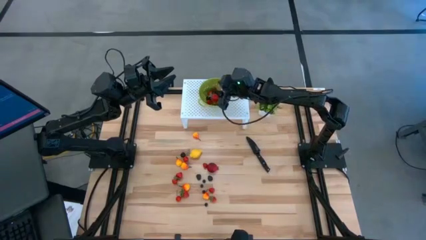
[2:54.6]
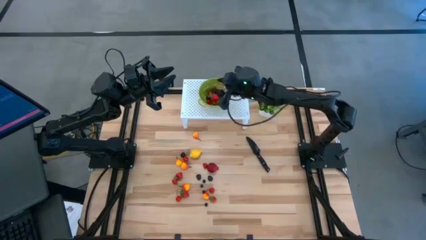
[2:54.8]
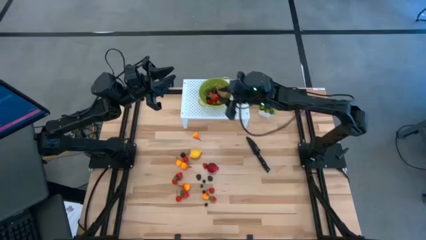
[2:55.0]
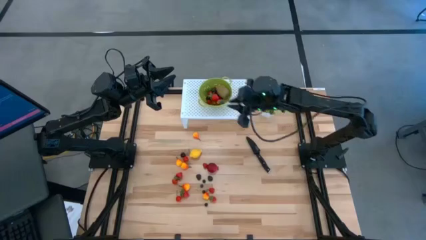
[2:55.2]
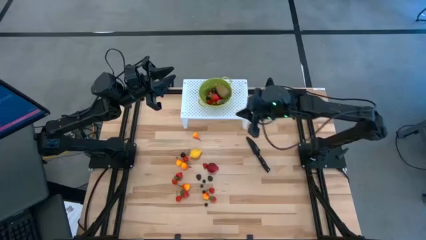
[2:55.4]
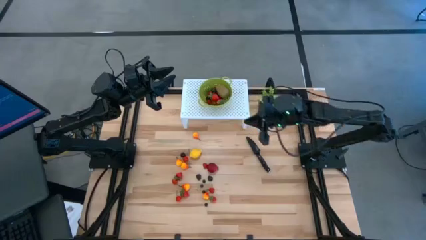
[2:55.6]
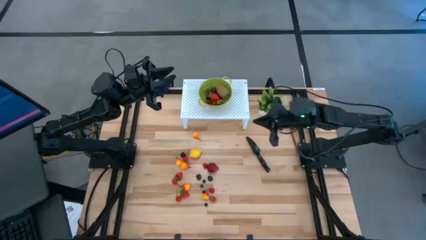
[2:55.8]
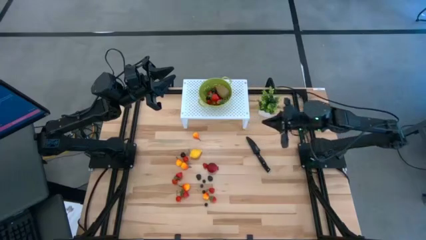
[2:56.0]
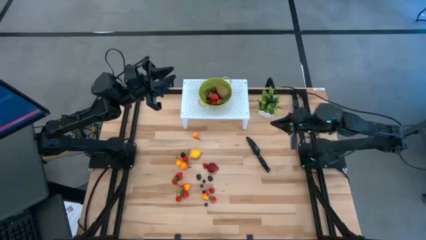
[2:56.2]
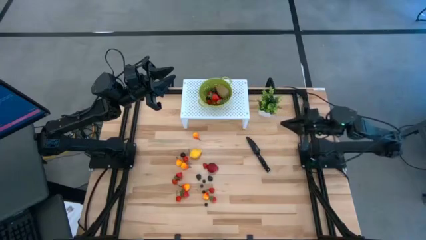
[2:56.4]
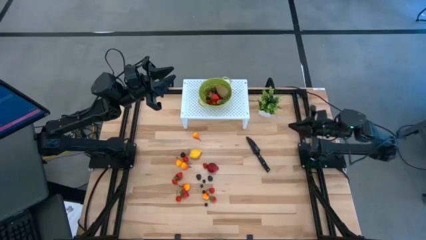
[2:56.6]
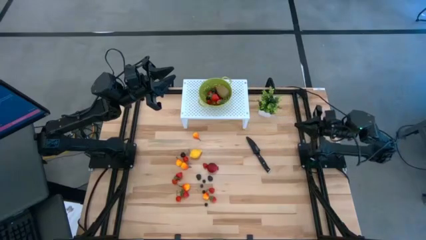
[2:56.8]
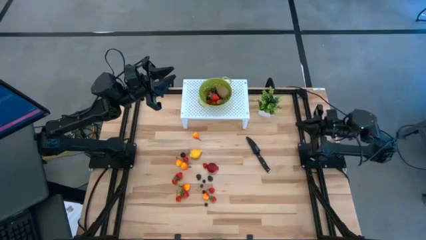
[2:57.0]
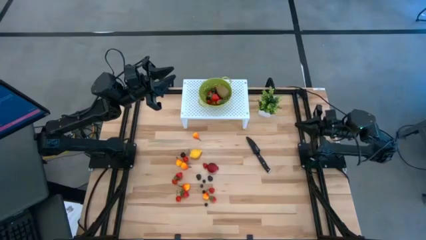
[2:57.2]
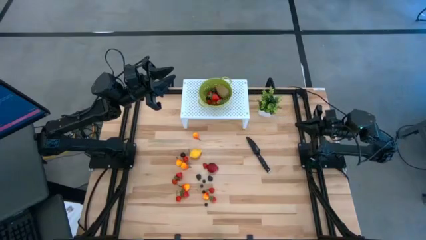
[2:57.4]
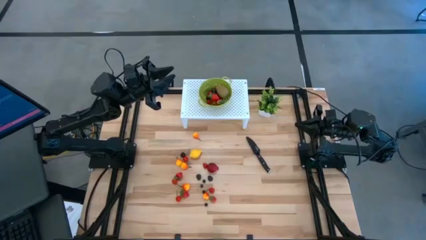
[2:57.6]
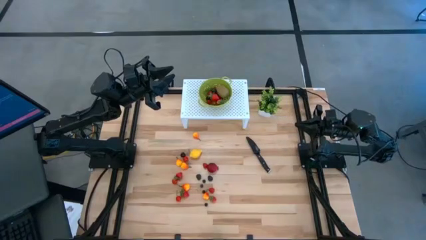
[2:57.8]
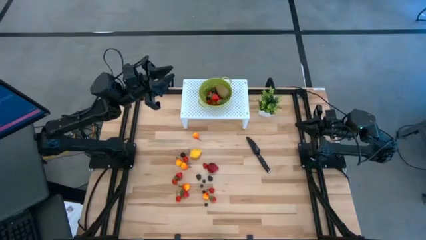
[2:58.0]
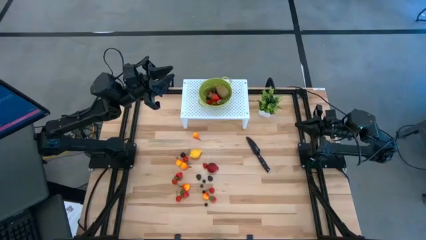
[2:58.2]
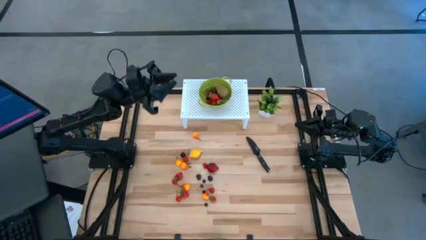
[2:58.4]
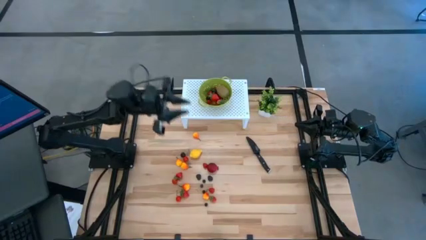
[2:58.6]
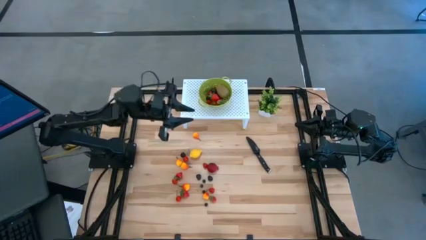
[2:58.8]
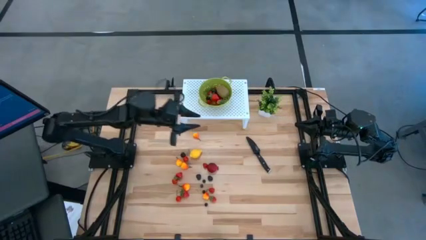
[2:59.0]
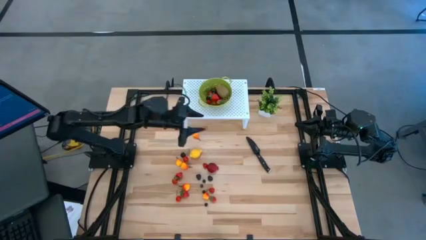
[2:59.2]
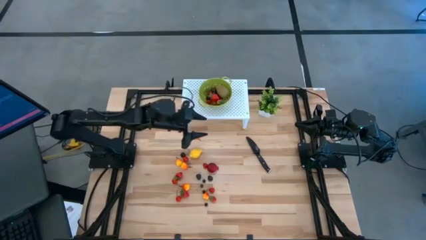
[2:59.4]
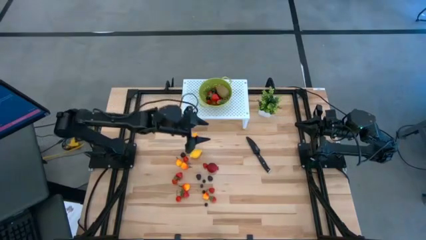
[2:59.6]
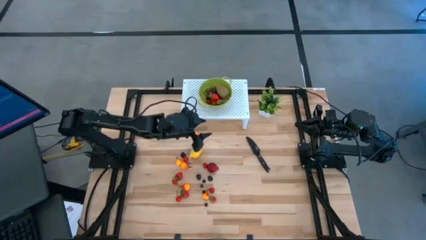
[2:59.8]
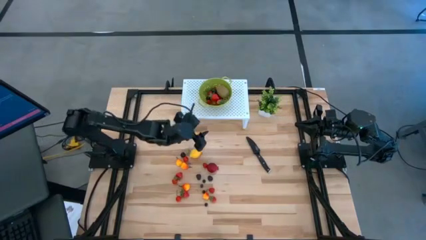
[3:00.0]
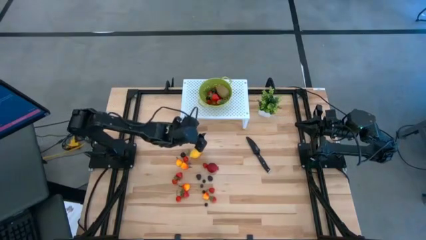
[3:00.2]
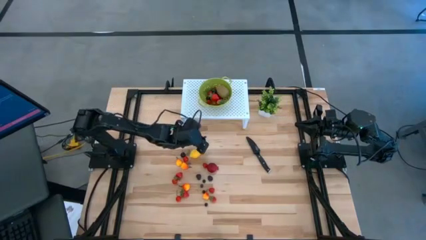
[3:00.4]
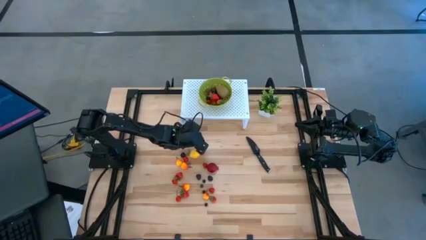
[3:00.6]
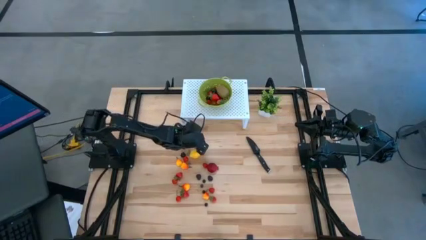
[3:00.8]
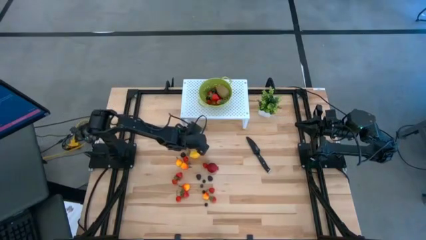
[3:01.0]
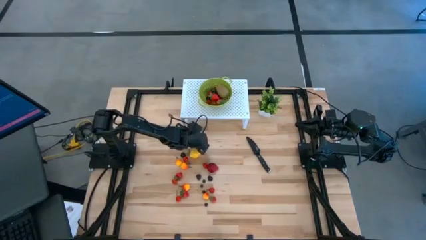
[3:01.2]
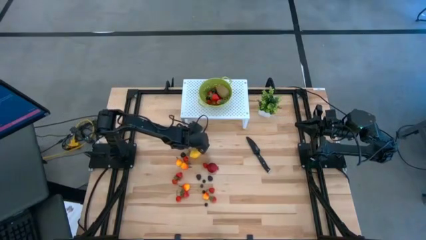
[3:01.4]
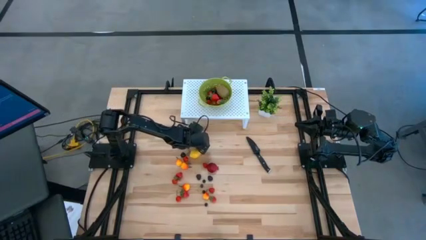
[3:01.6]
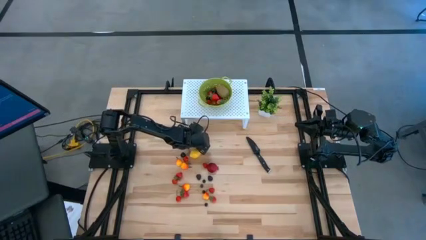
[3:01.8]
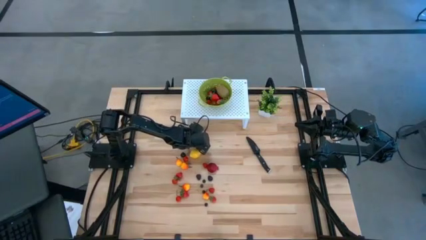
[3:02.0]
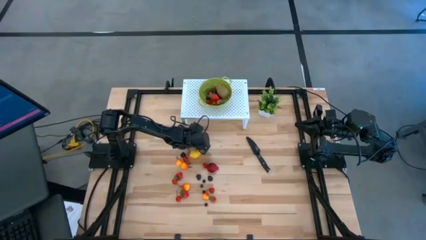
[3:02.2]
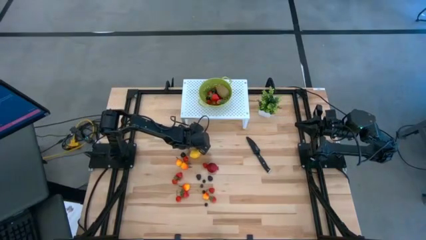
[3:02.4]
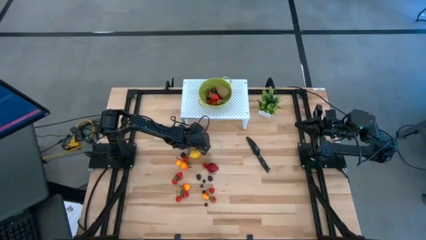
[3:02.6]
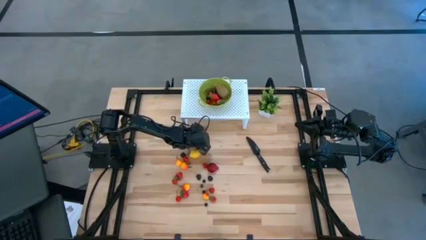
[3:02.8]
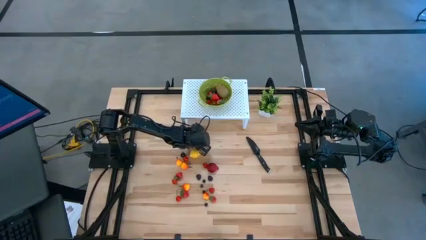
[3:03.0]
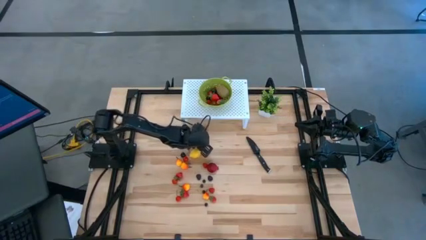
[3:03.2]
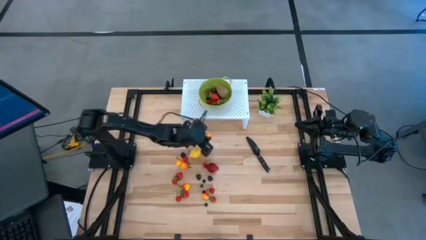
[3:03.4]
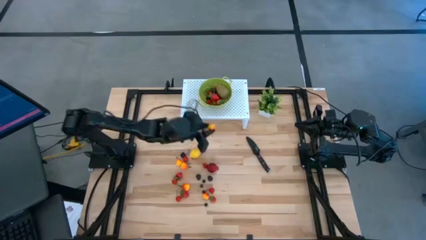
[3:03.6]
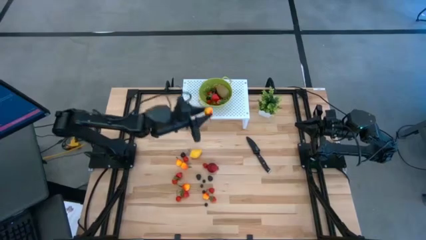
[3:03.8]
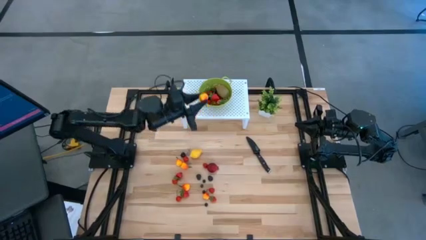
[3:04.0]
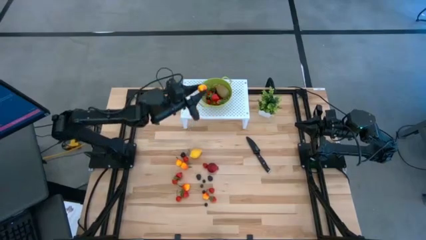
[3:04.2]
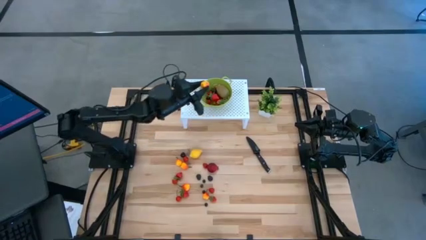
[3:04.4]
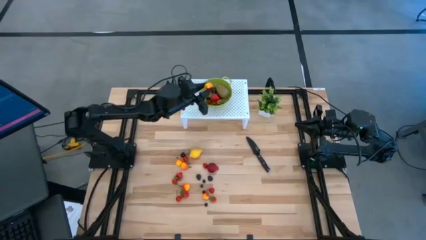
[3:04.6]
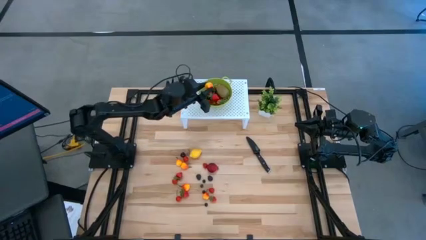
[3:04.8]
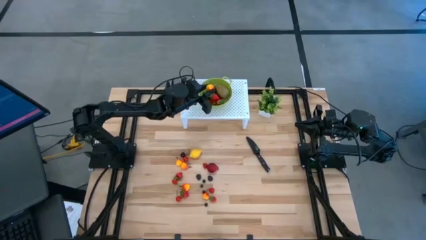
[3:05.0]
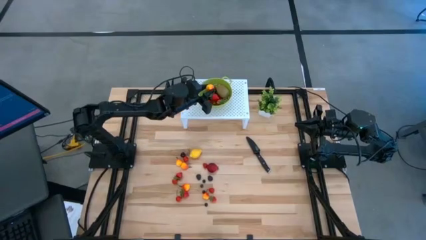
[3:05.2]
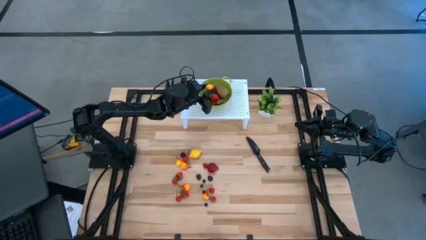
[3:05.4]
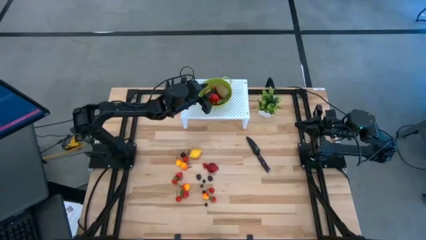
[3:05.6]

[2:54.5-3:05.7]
Task: Pick & Place Fruit
Put the yellow peach into the green strainer bowl

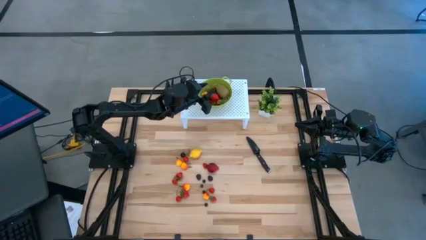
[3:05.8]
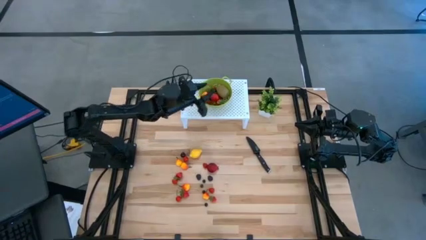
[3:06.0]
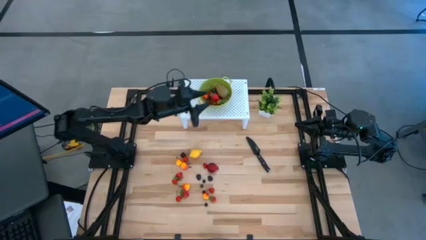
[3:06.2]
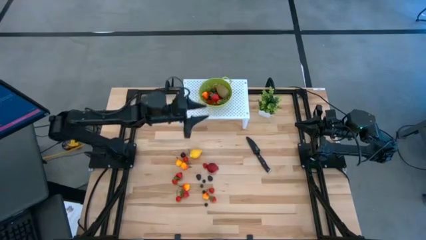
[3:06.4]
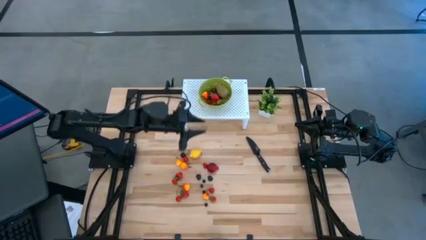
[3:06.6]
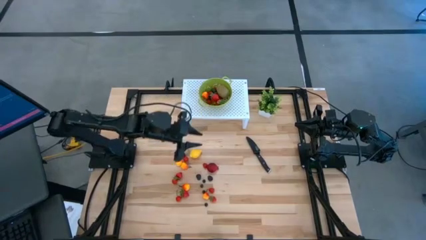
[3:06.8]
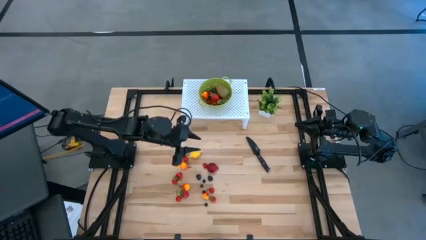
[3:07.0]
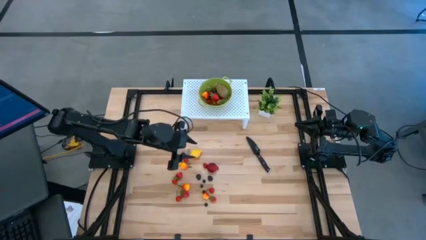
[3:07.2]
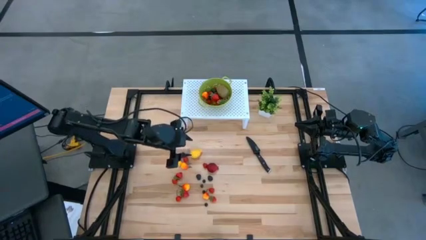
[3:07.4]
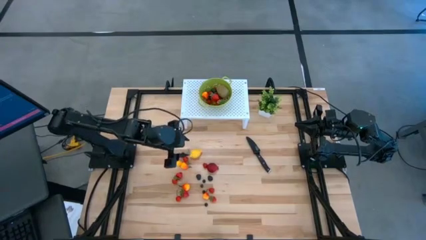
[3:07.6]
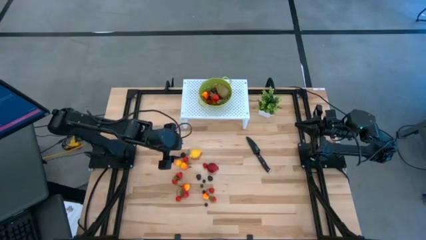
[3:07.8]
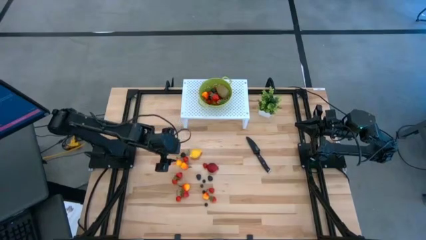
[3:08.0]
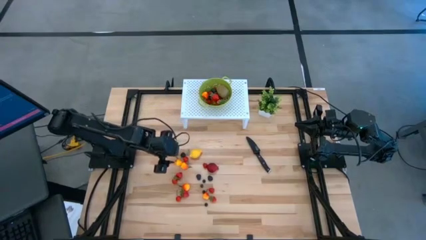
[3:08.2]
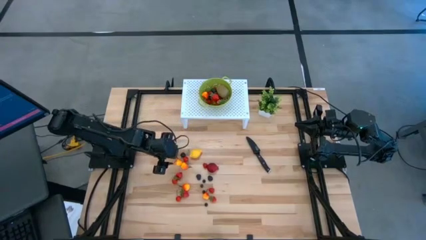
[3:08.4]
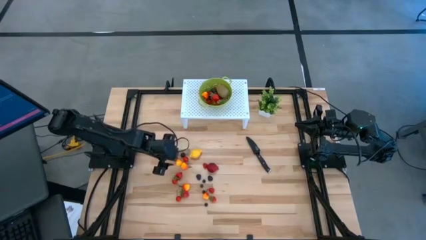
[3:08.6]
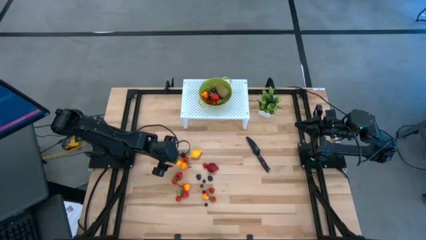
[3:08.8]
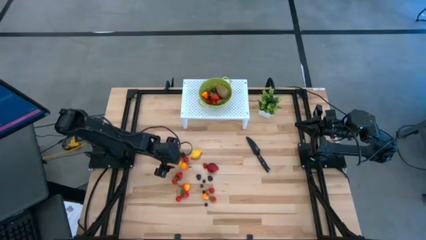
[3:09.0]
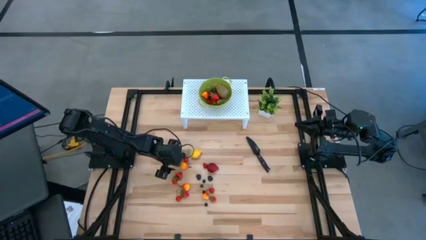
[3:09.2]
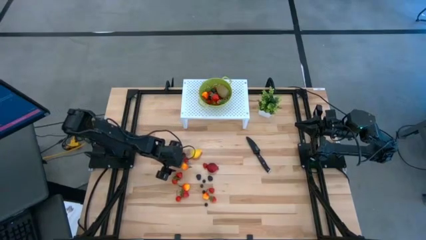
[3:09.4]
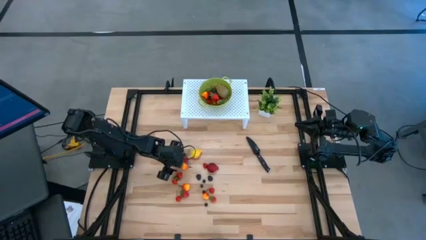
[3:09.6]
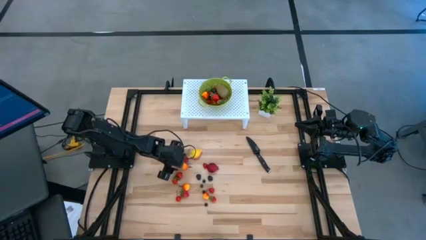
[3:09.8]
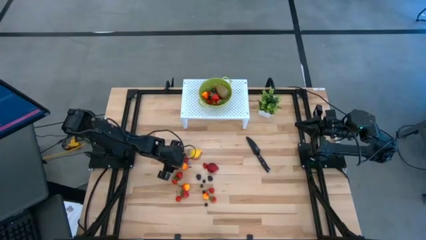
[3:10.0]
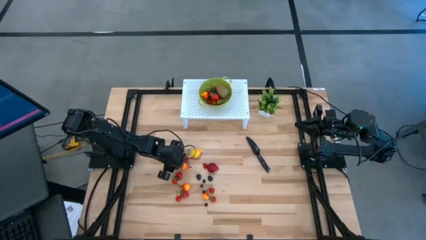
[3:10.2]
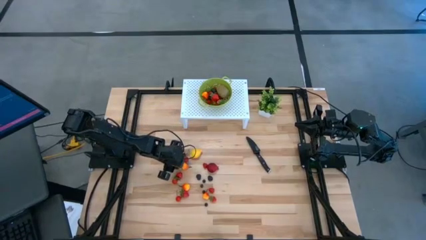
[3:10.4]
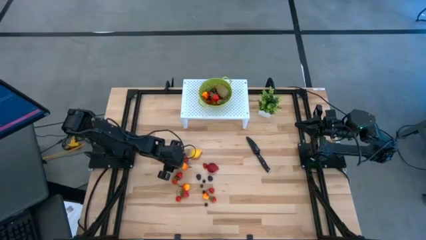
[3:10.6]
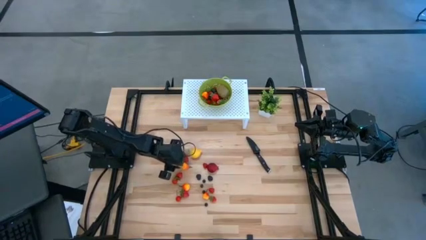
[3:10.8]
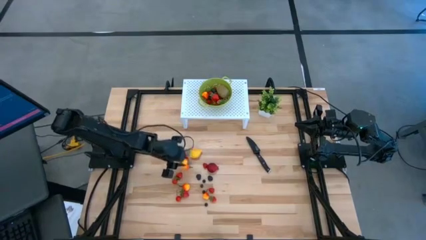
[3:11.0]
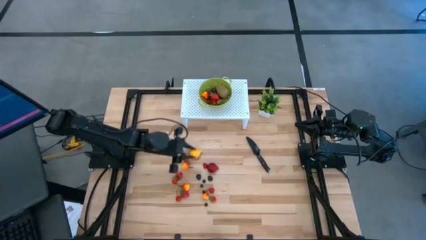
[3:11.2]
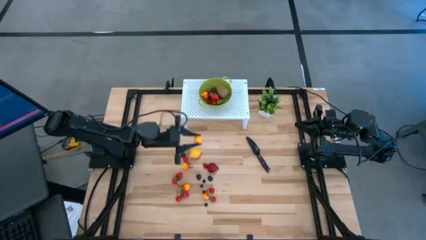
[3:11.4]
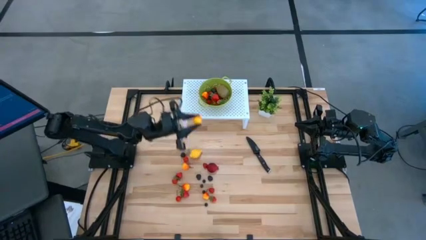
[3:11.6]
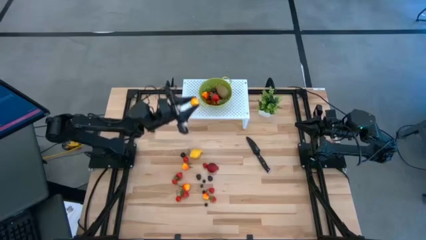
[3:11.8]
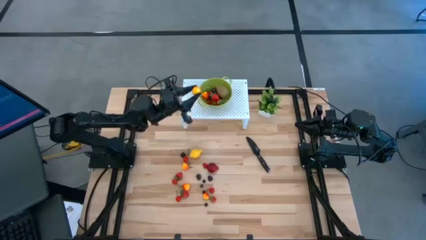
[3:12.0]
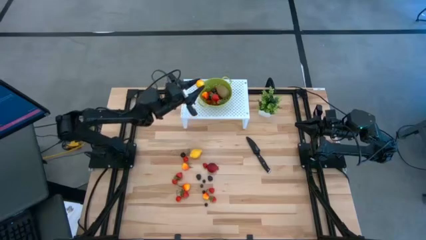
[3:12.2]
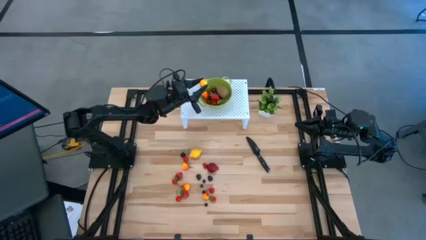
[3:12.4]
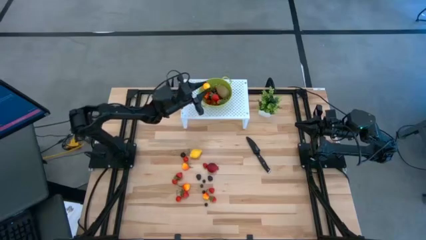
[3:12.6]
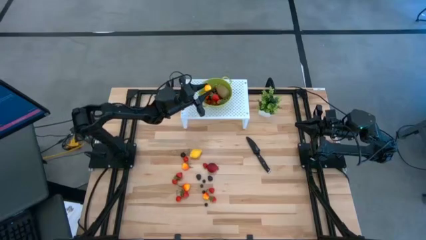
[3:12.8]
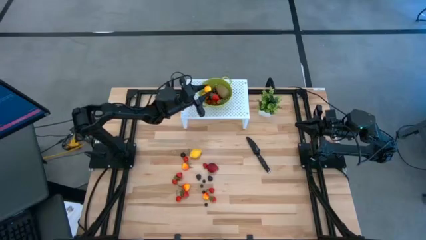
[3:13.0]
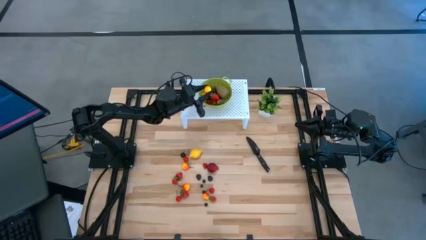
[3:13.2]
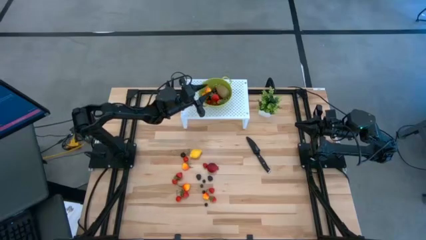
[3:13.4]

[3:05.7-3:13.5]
Put the yellow peach into the green strainer bowl
